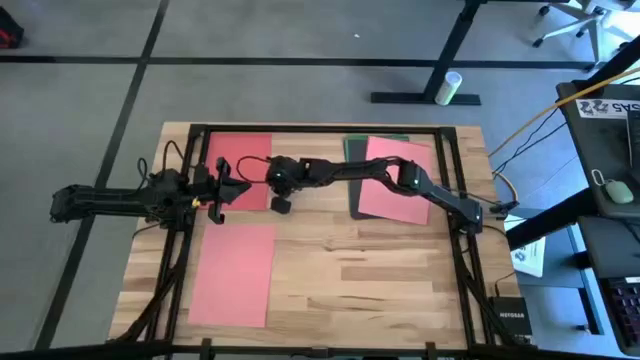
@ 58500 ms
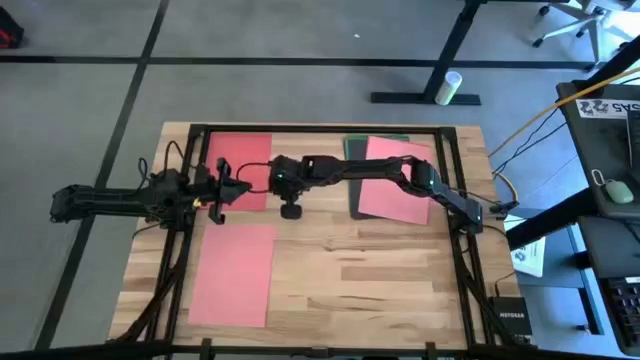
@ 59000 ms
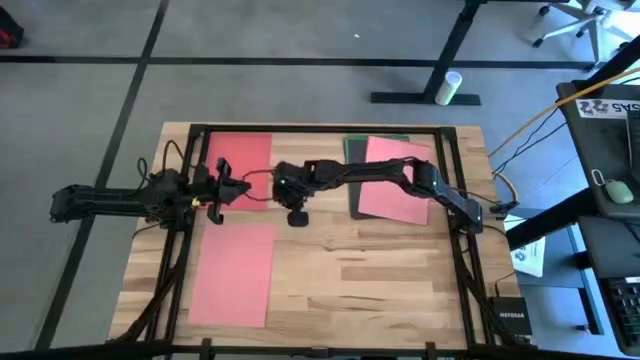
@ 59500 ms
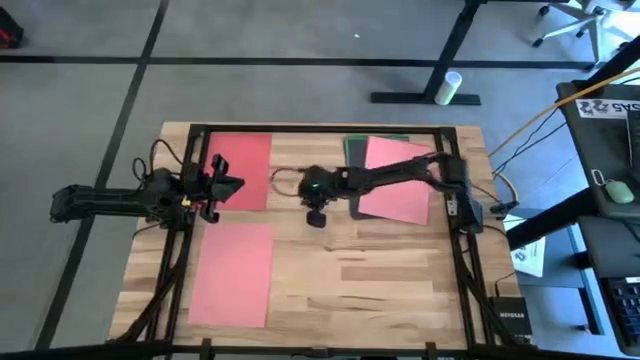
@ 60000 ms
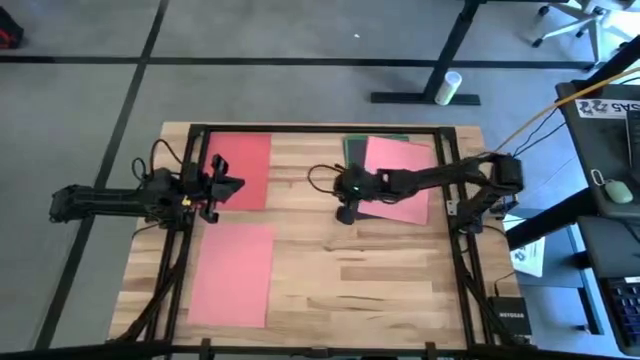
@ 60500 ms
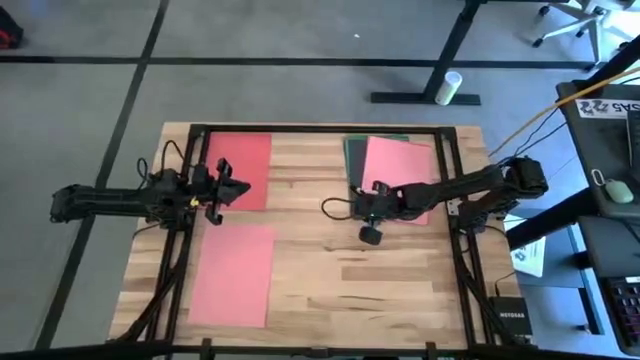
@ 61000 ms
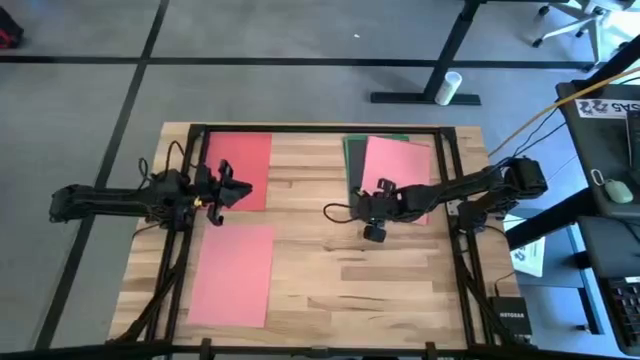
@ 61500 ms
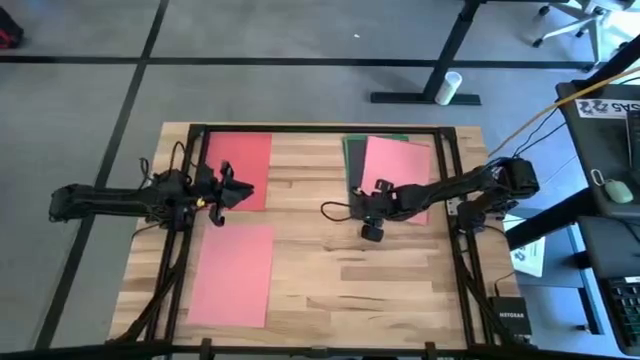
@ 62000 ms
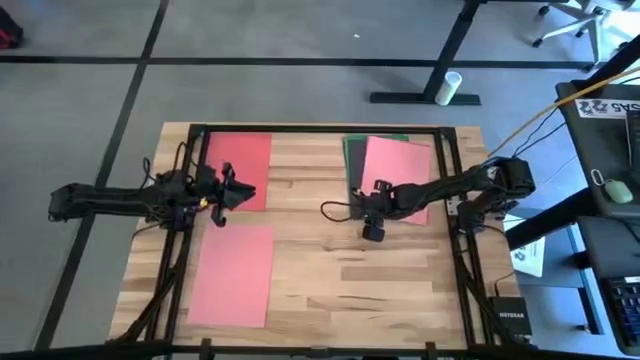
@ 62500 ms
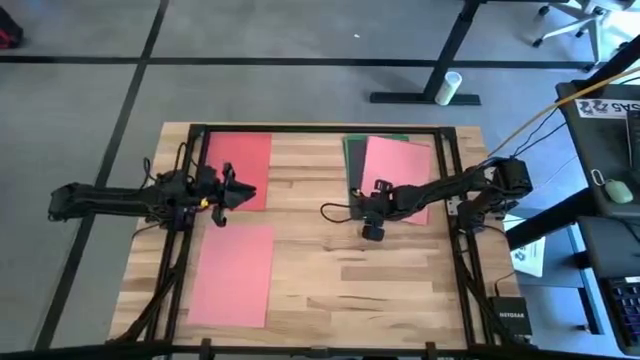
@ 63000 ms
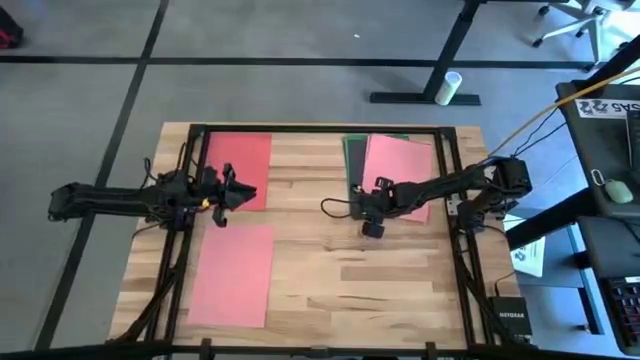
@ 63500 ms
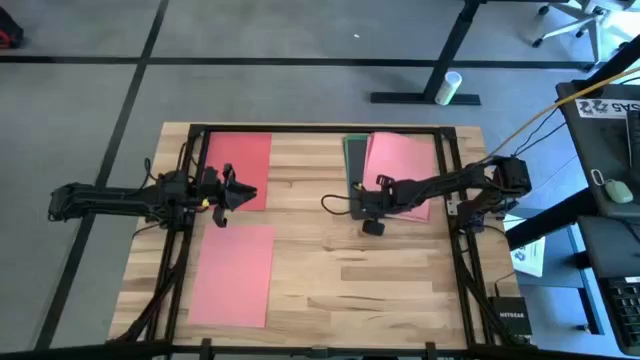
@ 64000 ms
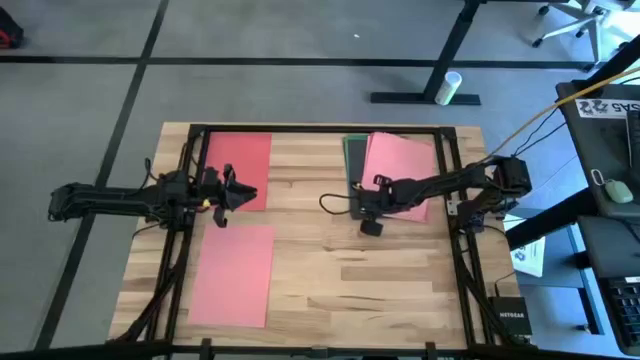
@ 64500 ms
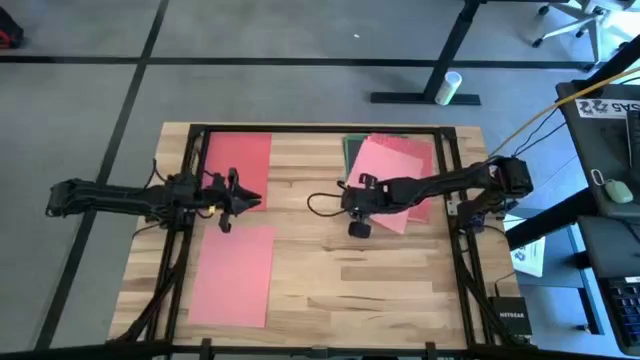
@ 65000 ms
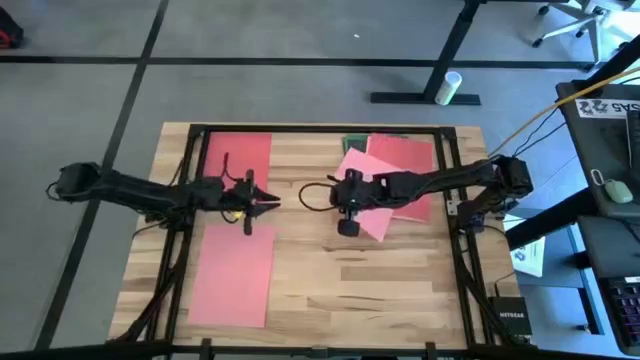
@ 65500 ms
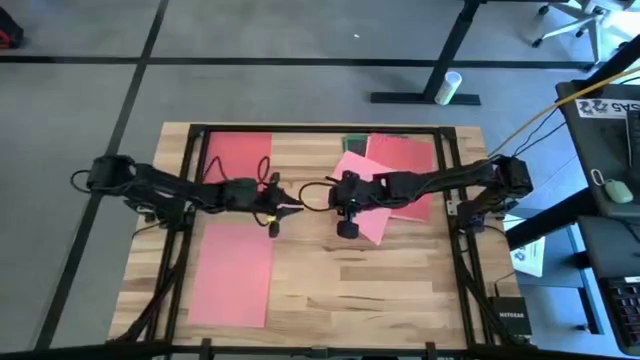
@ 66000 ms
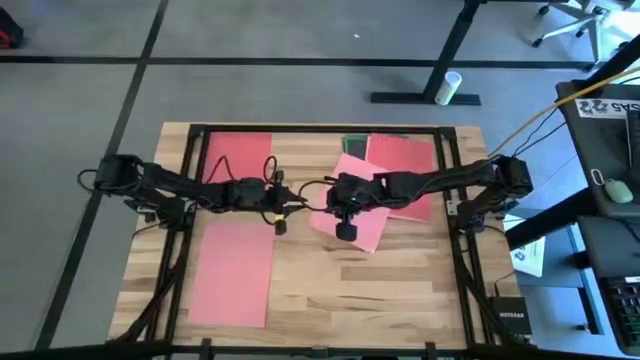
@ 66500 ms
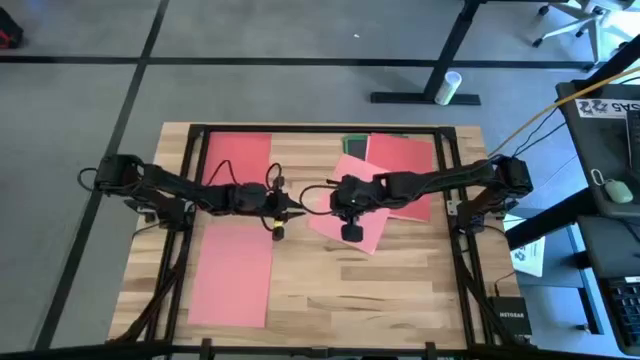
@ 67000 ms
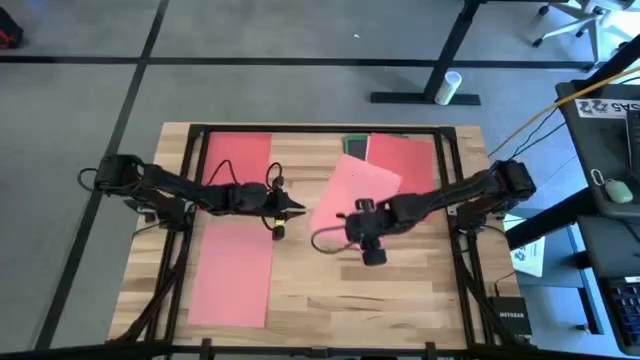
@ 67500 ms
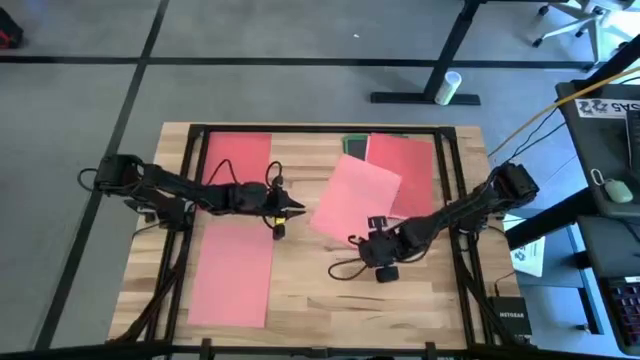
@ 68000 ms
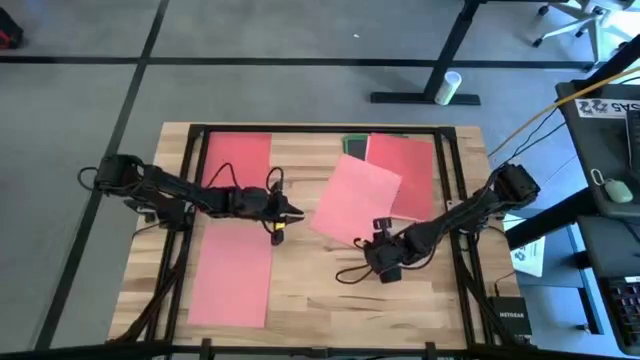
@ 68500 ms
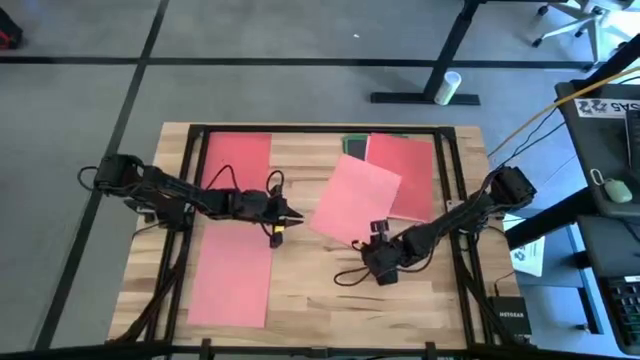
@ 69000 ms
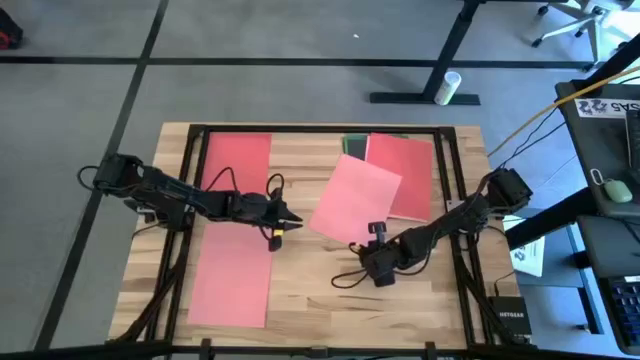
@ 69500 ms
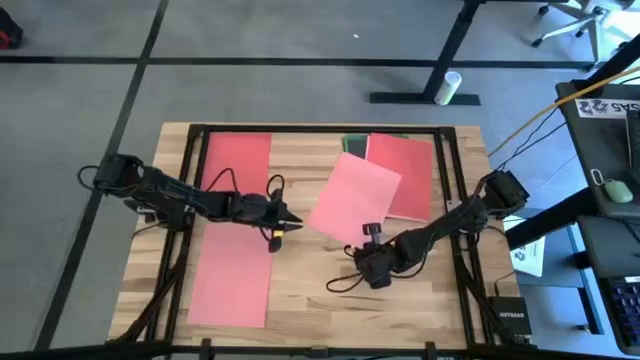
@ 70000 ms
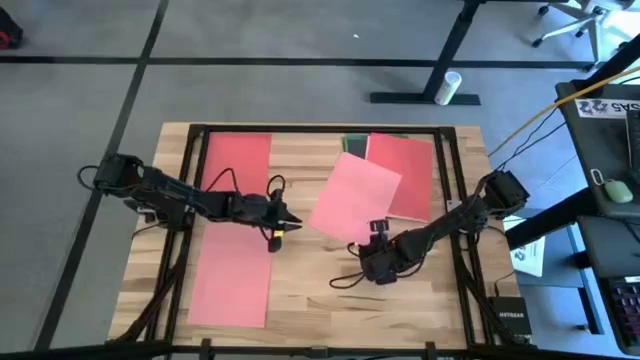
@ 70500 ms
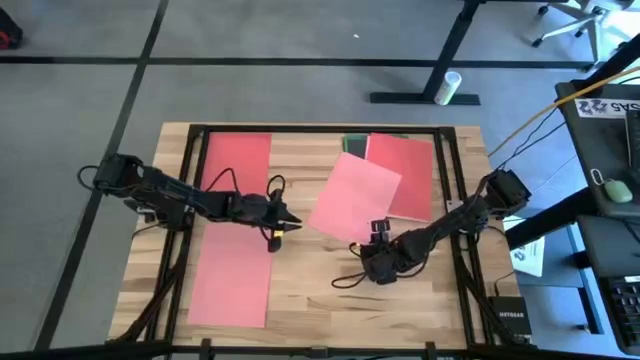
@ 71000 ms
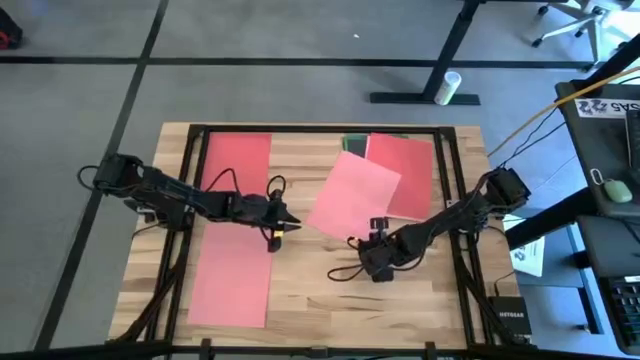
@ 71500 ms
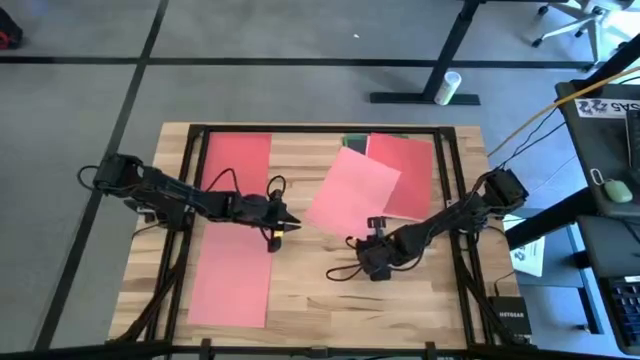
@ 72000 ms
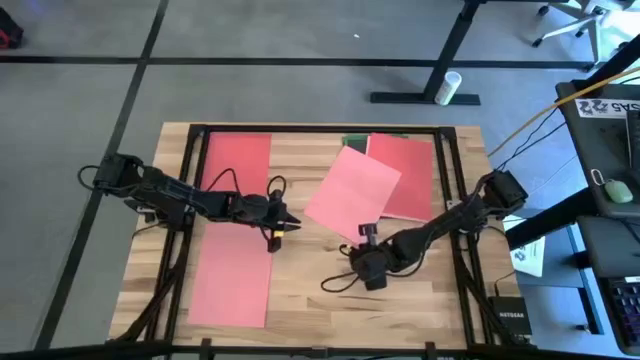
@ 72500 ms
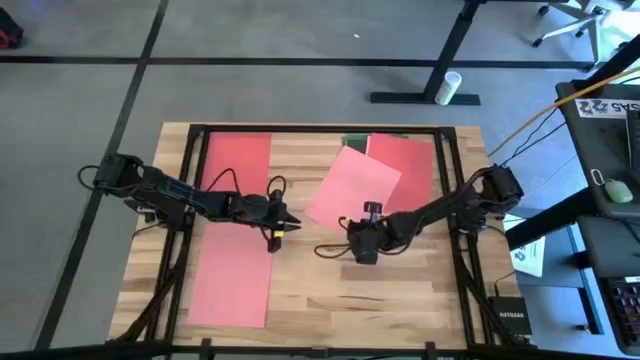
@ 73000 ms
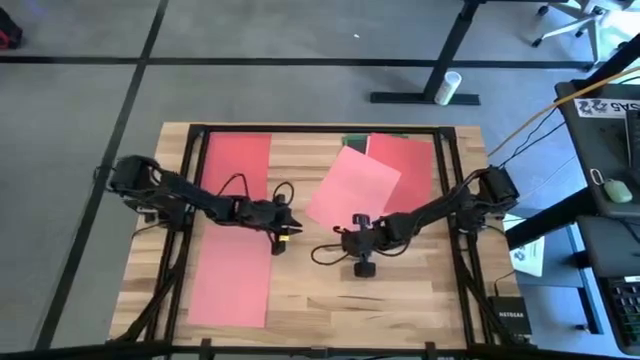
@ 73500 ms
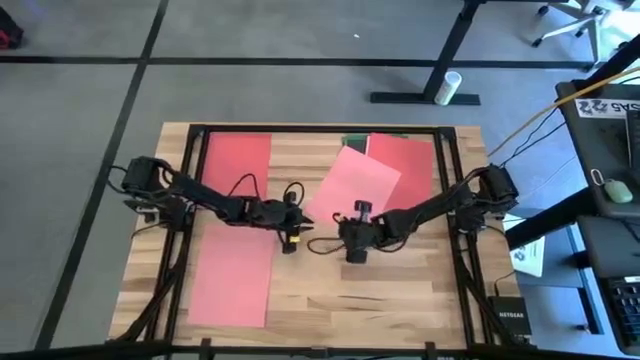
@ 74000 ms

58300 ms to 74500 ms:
Task: Organize paper
Stack the pink paper on top of the pink paper

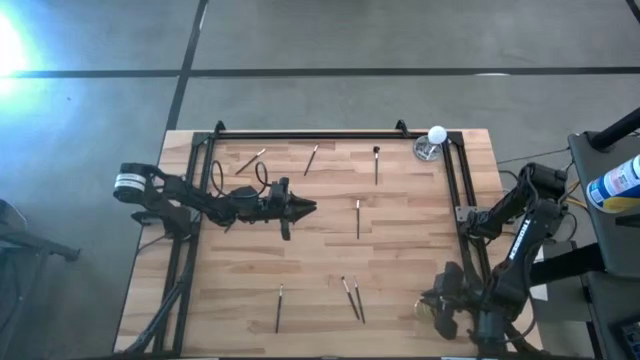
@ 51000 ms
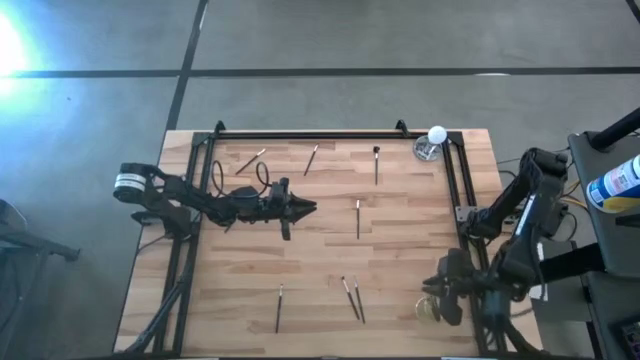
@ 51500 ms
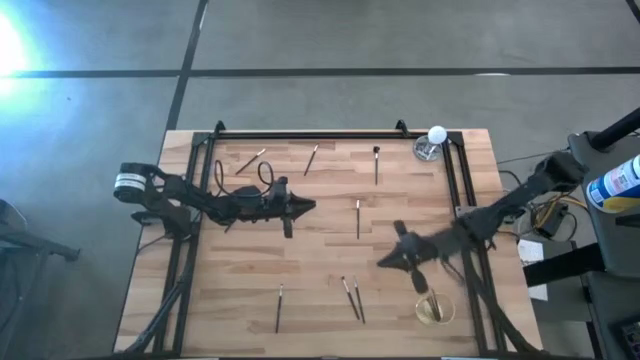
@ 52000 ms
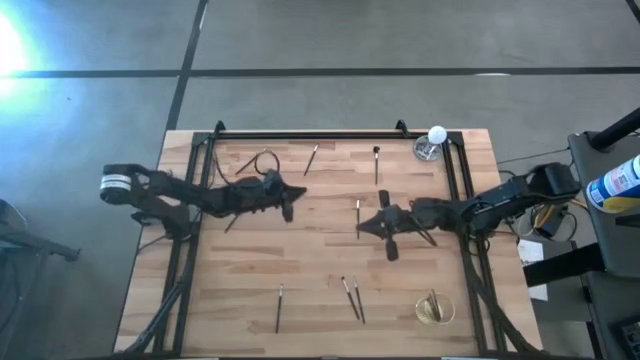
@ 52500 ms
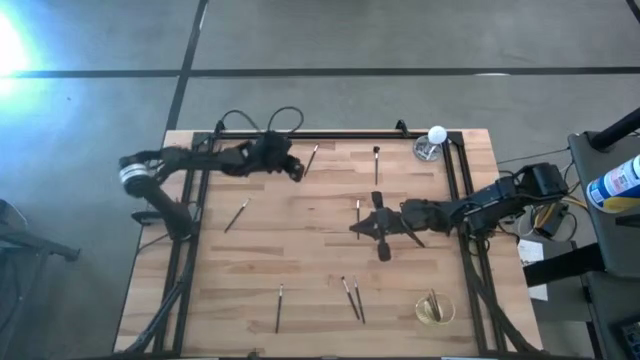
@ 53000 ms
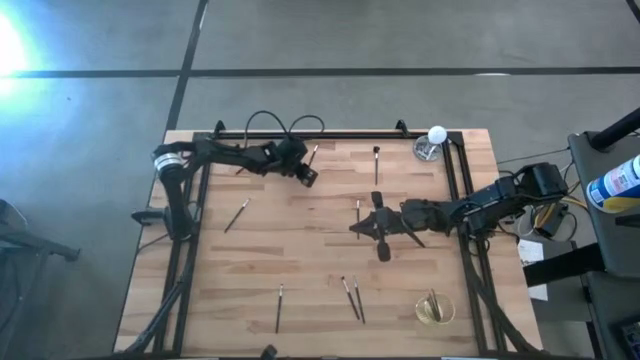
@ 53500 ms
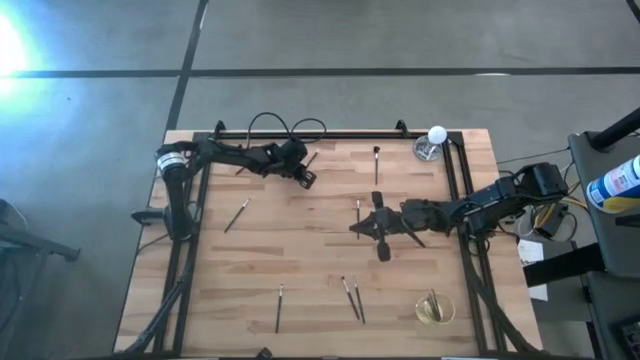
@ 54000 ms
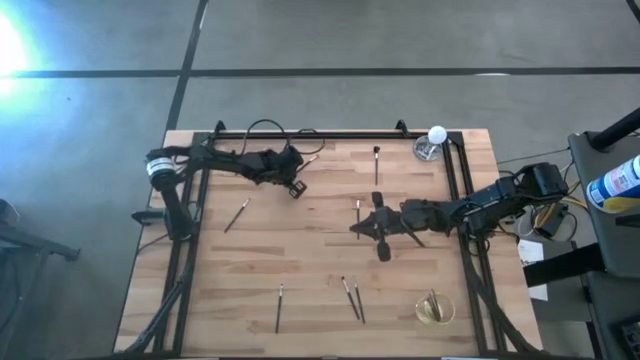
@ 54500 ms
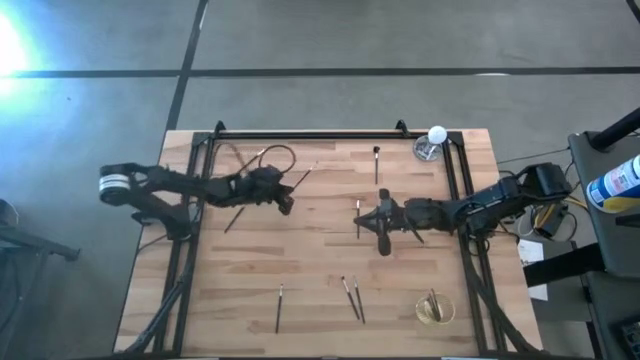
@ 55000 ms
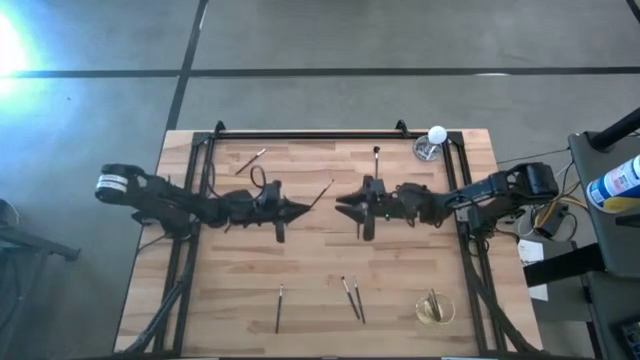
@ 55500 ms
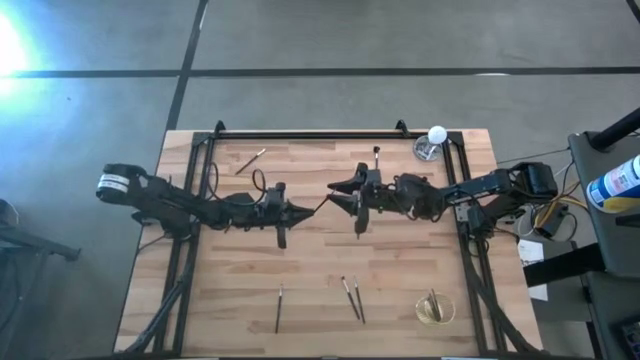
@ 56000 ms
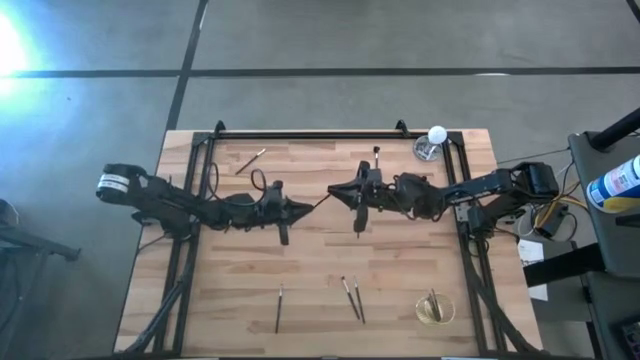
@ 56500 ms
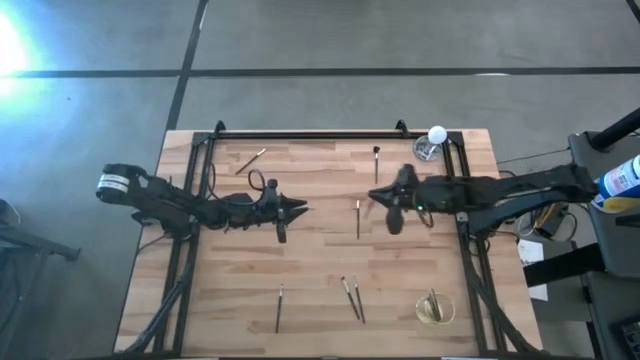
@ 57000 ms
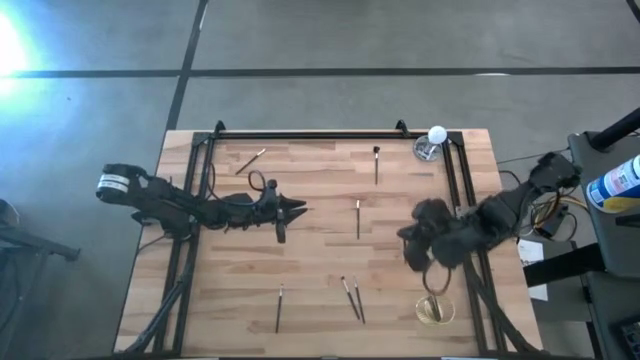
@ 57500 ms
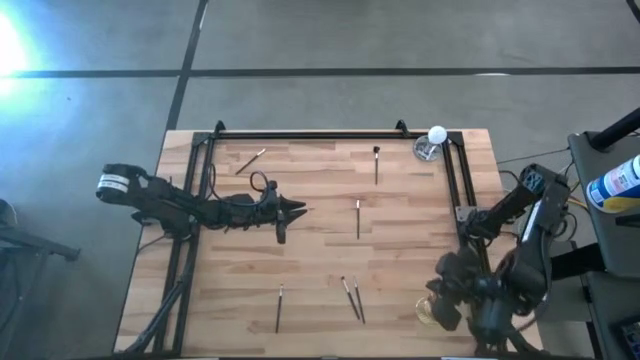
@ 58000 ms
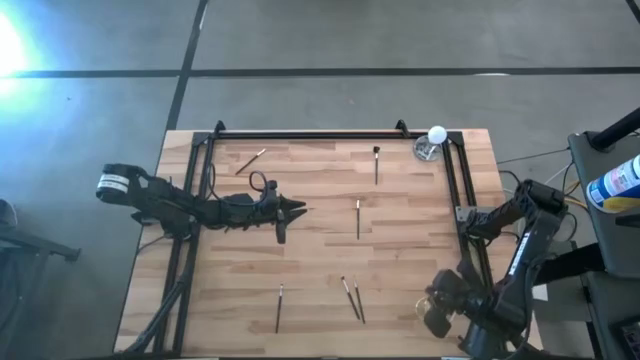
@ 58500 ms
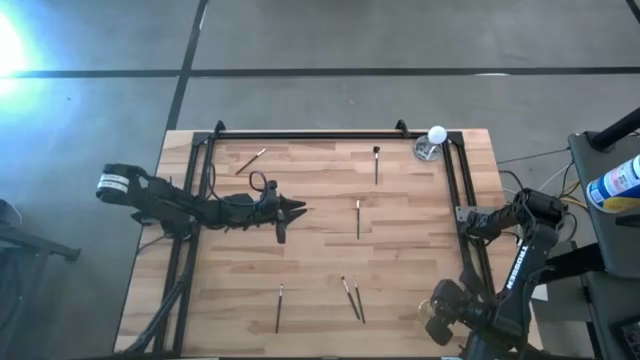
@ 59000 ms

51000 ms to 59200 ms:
Task: Pick & Place Makeup Brushes
Put the eyeshadow brush into the makeup brush holder
